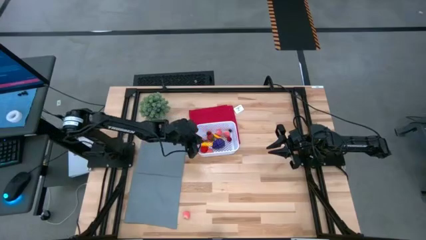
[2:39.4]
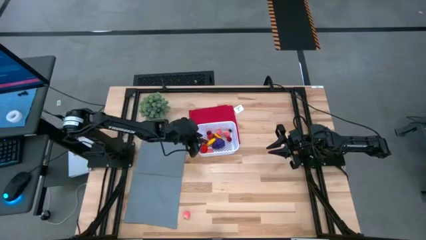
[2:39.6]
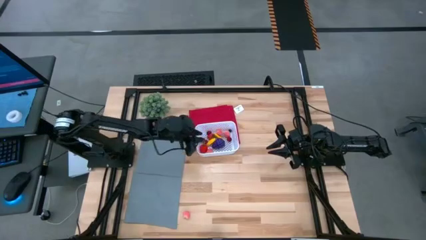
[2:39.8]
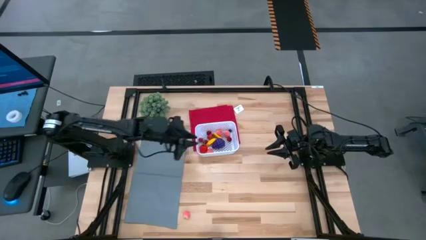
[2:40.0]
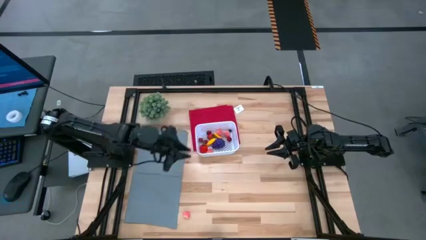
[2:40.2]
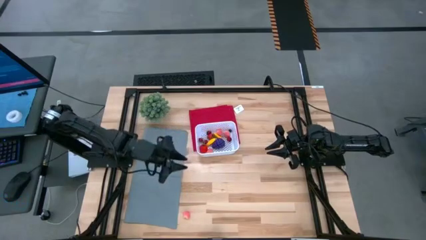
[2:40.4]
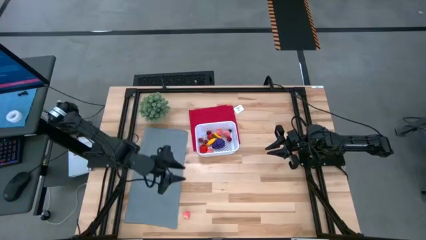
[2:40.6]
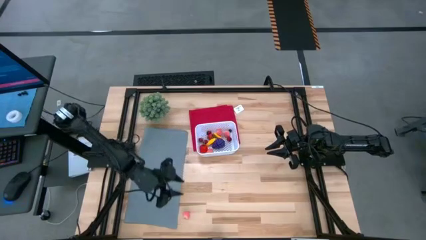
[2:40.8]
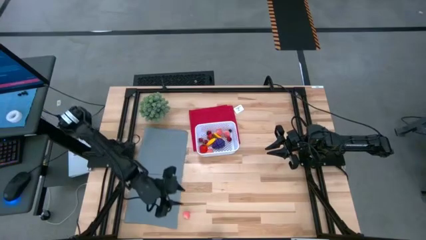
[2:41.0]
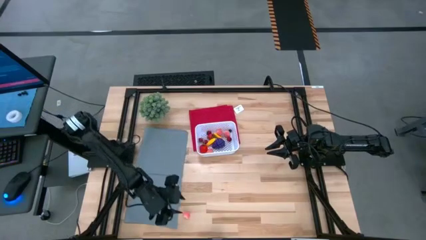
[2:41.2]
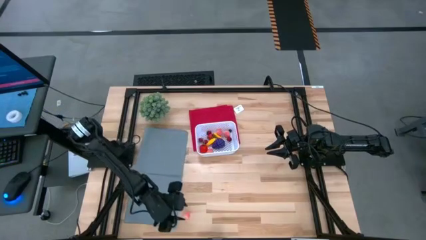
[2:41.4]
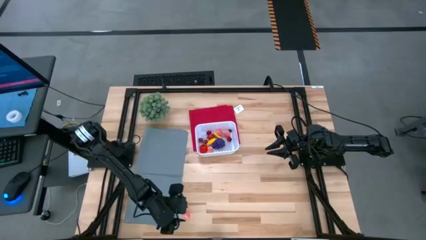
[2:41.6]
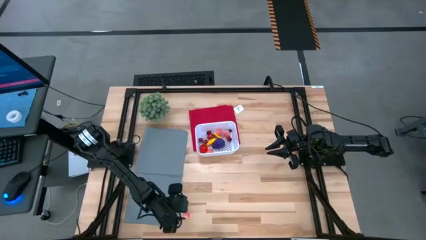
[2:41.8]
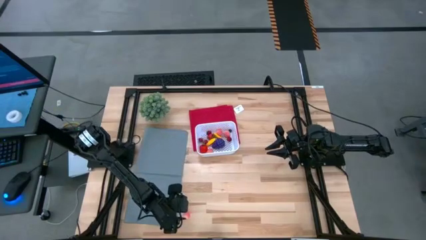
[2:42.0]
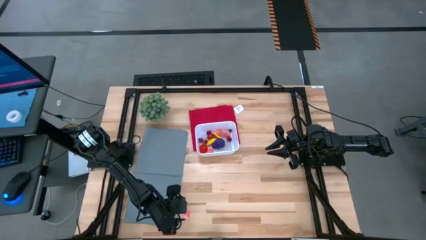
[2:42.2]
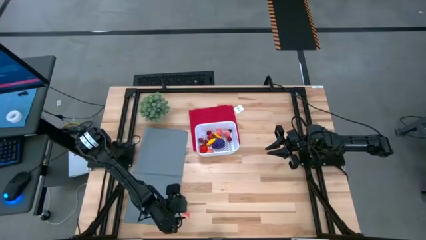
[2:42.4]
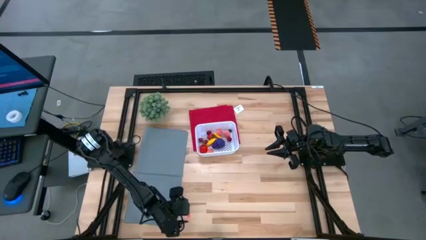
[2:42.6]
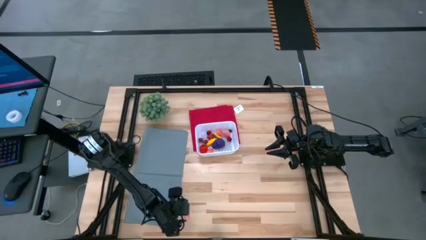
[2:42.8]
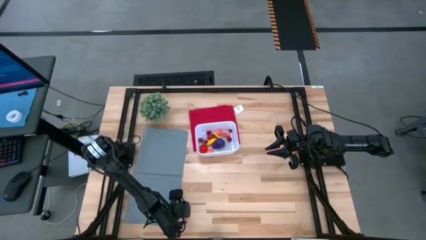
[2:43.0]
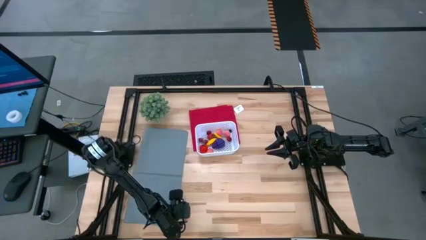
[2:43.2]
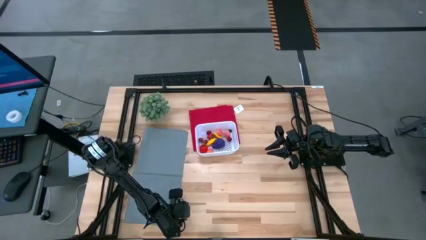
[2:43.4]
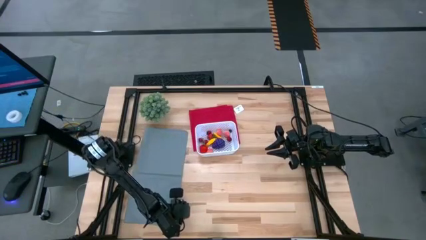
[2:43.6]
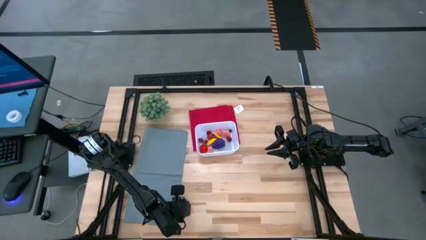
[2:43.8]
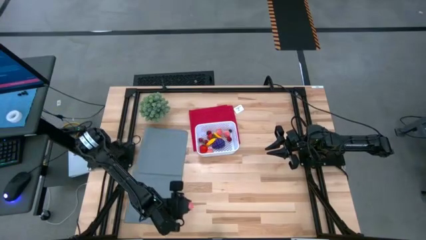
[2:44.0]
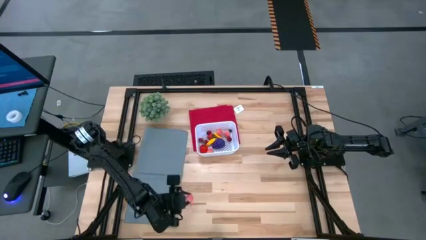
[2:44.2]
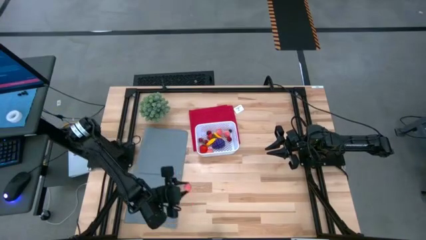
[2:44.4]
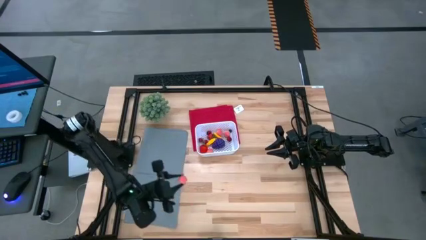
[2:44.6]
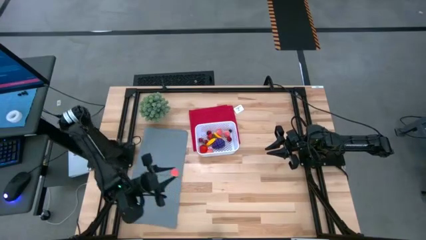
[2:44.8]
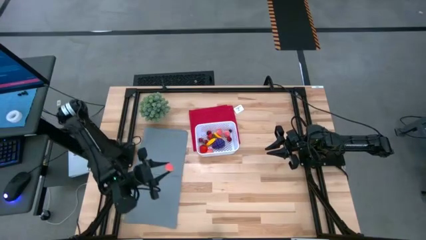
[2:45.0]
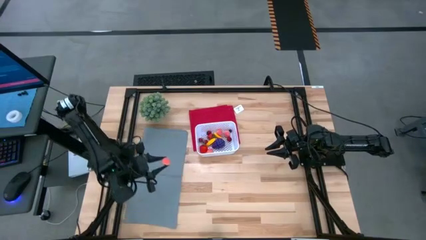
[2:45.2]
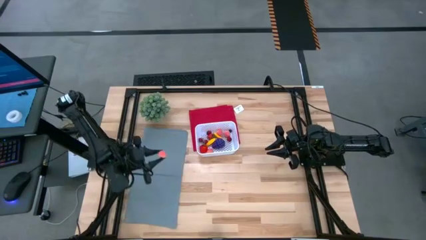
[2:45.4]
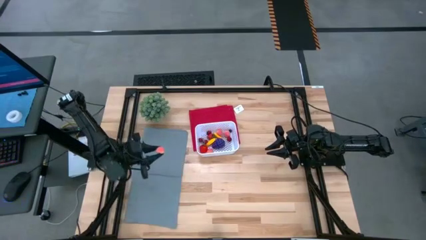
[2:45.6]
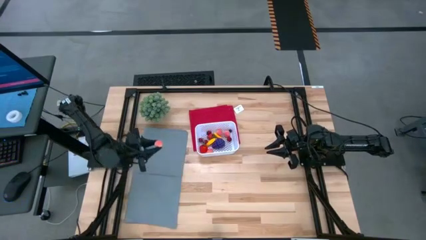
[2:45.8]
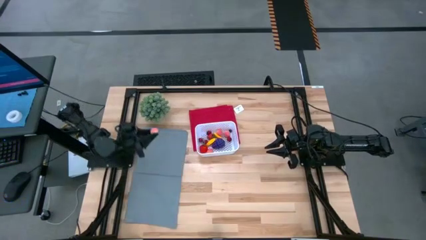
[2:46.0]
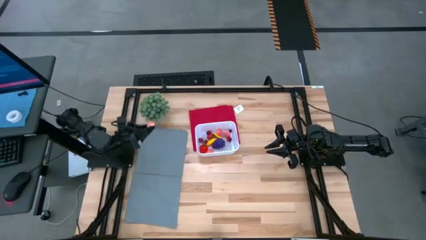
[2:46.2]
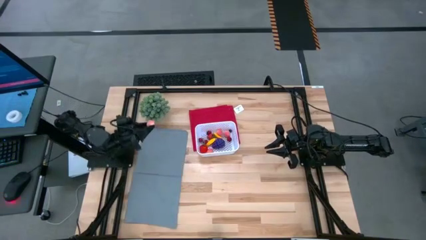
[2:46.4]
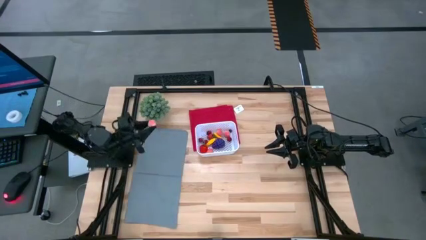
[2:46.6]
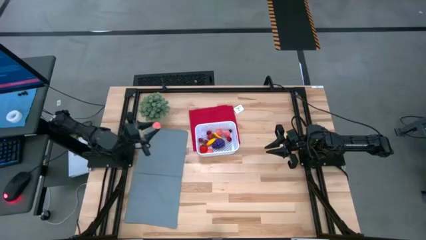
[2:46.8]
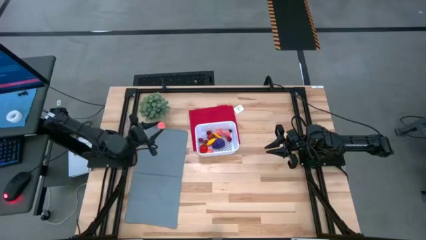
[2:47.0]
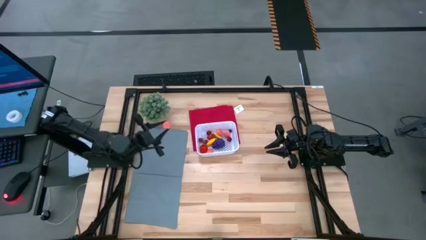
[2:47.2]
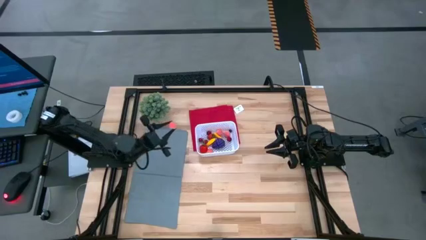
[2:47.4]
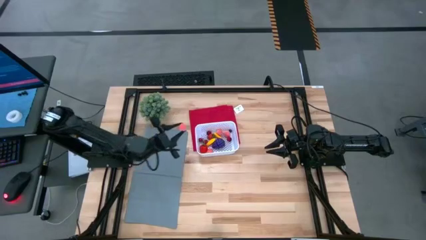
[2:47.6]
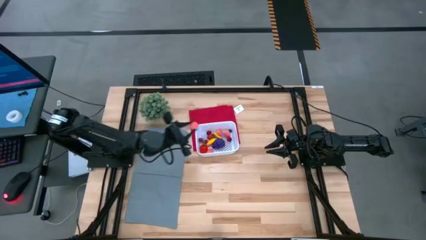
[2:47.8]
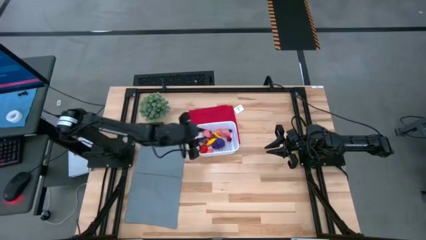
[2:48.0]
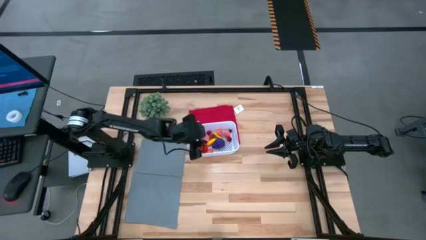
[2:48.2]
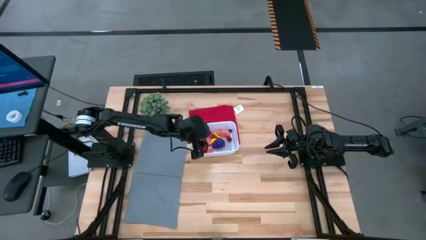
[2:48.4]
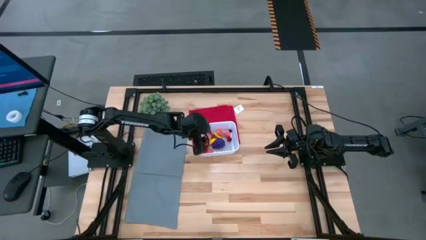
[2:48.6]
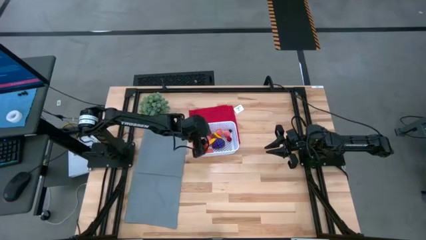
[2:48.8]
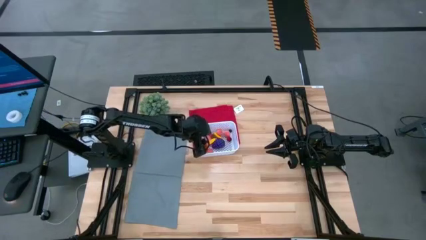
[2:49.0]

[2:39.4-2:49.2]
Task: Pick and placing Produce into tupperware
Put the pink peach into the white bin

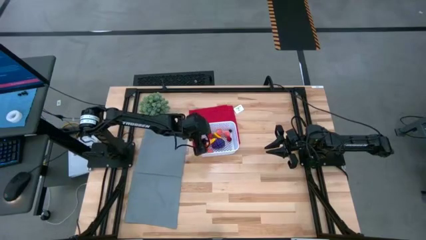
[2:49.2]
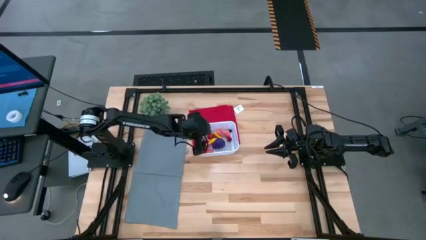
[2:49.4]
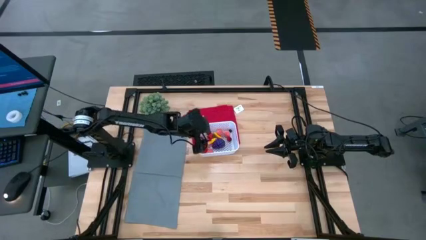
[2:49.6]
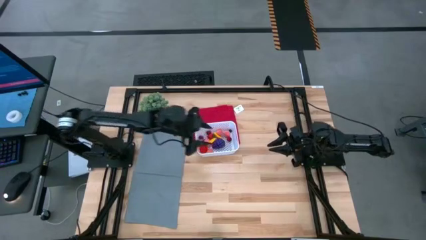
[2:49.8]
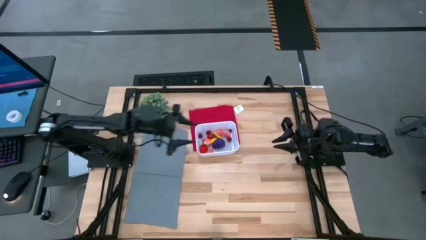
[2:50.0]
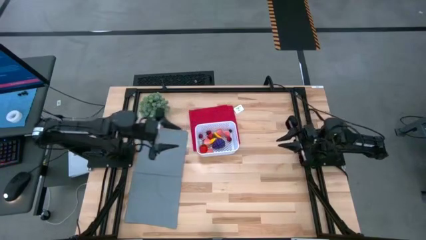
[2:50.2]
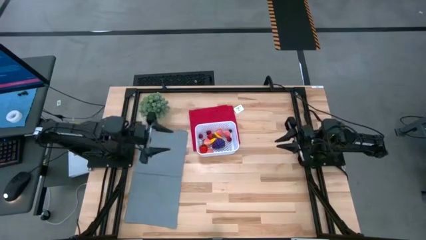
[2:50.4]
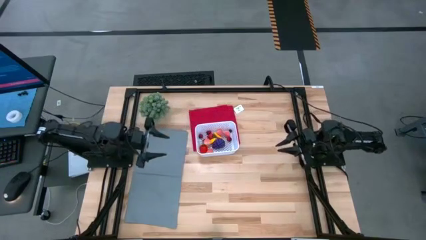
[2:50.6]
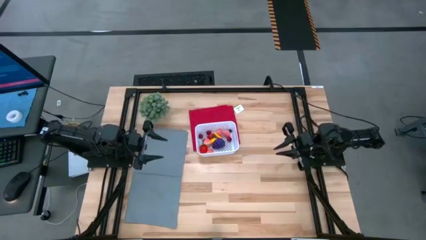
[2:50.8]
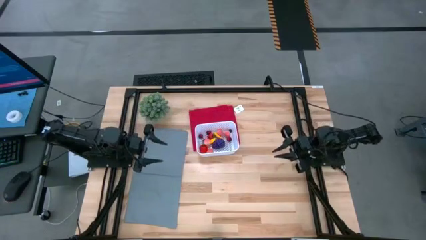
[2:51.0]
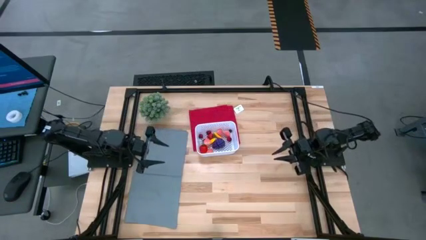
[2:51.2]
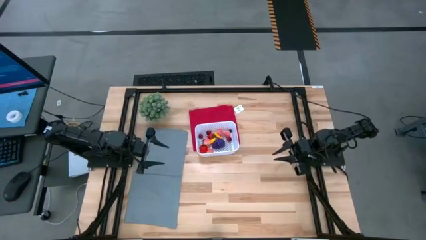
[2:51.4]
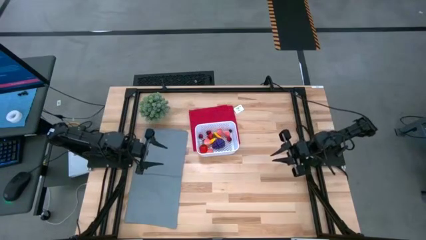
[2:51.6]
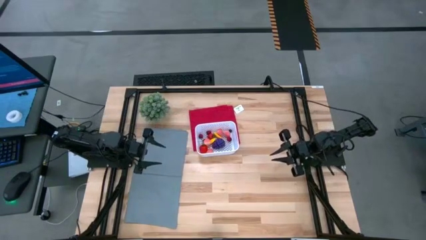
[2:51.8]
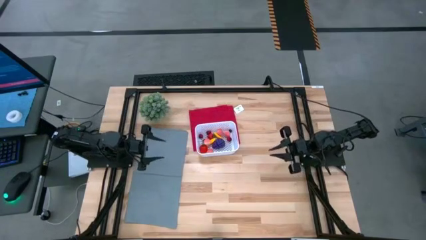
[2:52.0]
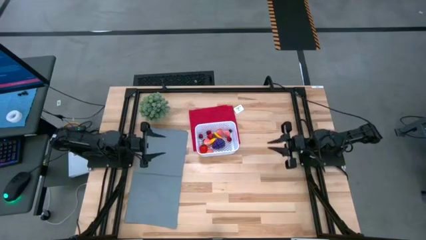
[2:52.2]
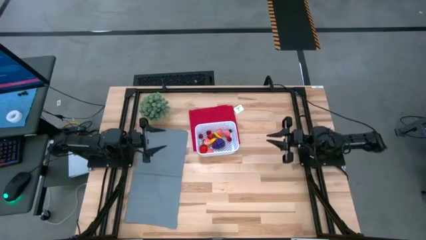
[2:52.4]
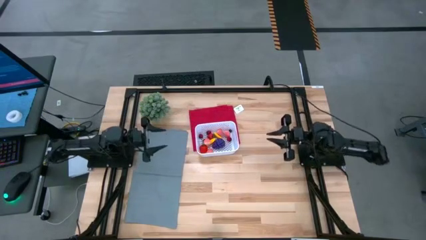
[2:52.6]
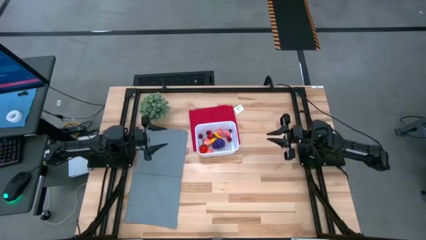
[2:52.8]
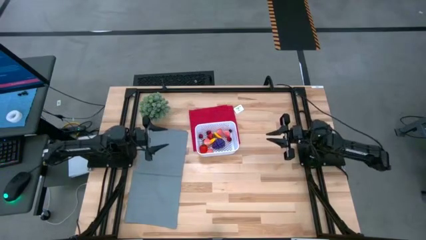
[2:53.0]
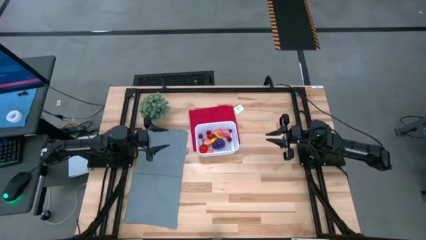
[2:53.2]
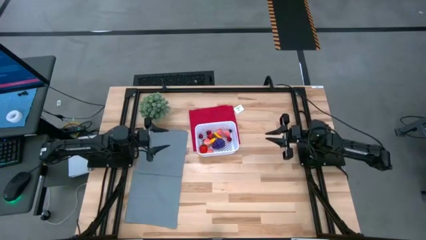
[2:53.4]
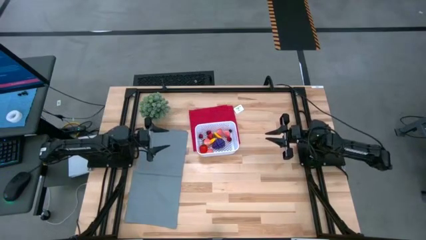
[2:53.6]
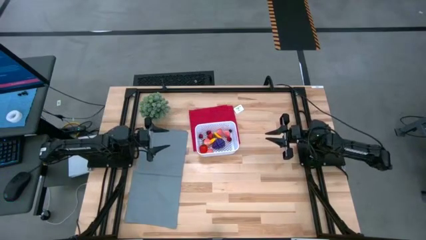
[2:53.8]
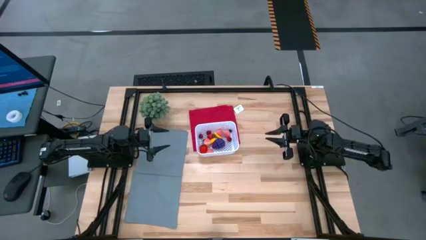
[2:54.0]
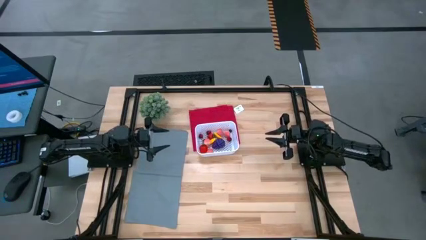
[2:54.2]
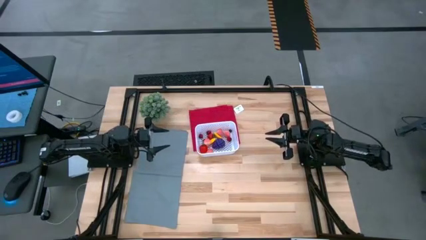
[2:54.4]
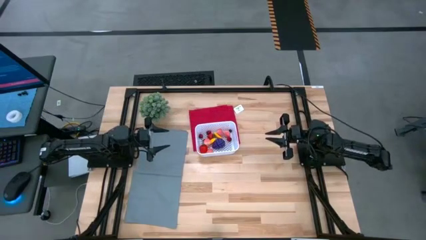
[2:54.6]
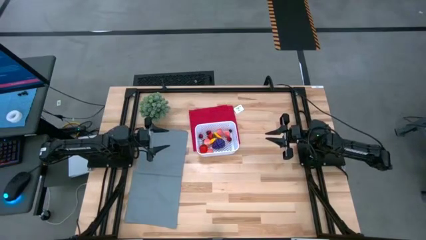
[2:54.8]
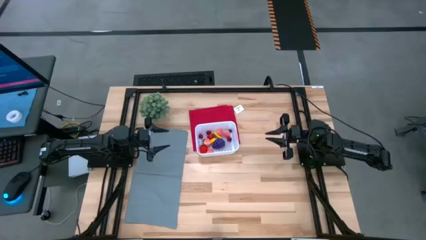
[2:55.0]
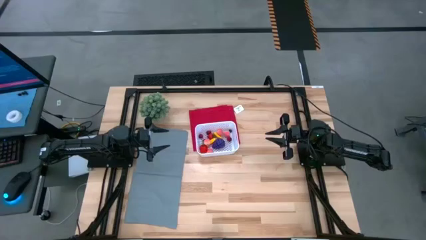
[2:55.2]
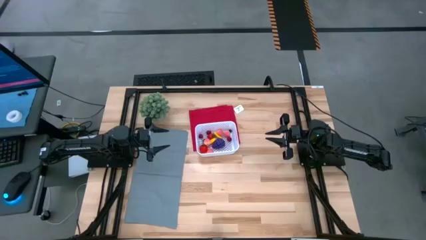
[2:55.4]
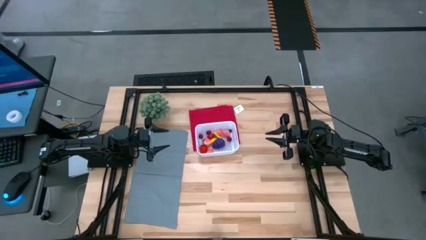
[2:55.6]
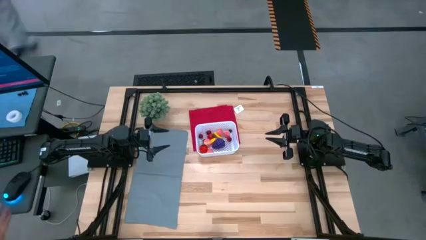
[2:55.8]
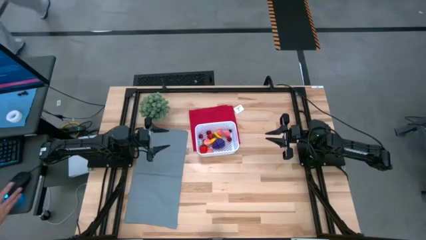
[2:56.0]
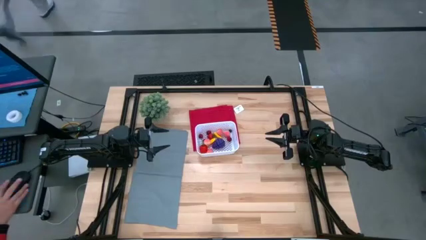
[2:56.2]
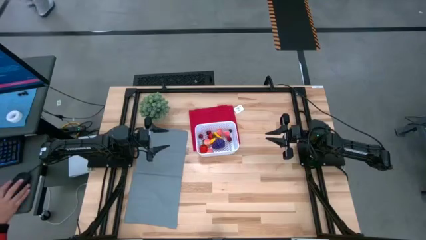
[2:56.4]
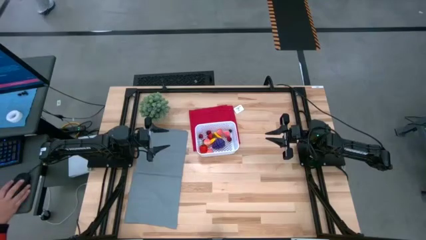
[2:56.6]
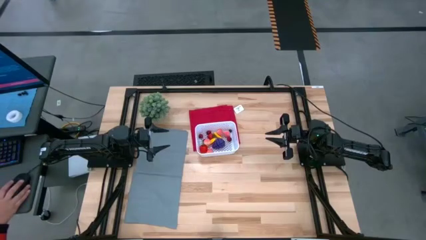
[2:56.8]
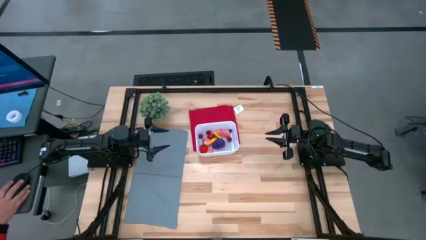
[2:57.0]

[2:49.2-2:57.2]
Return to Home Position
